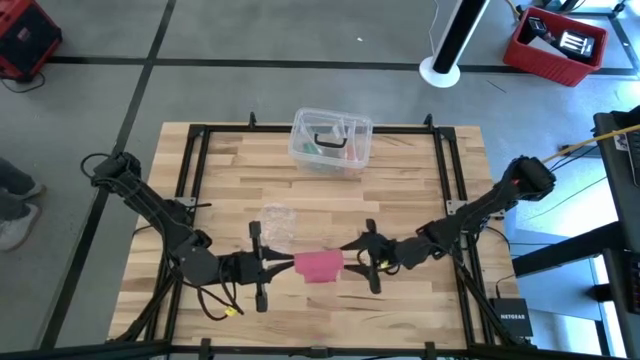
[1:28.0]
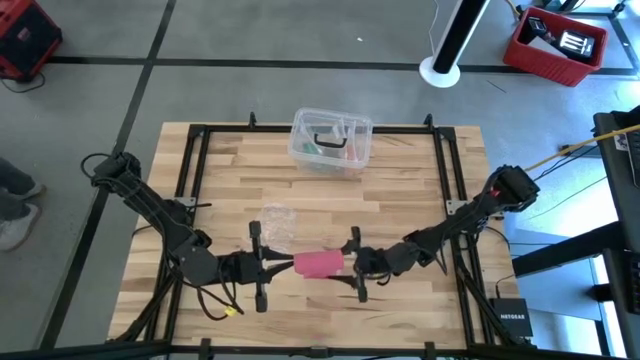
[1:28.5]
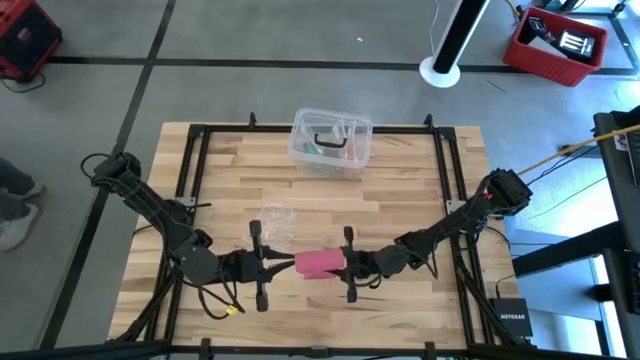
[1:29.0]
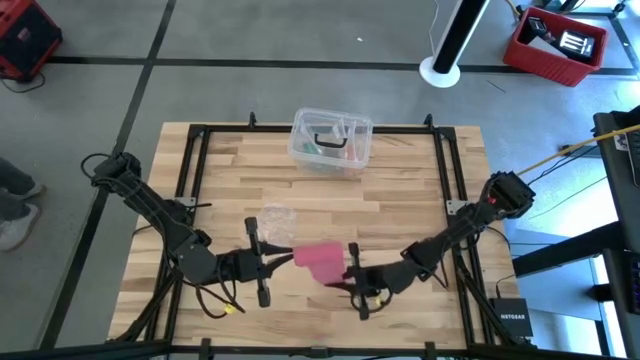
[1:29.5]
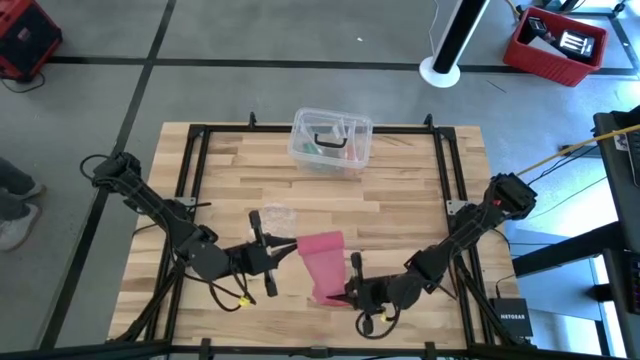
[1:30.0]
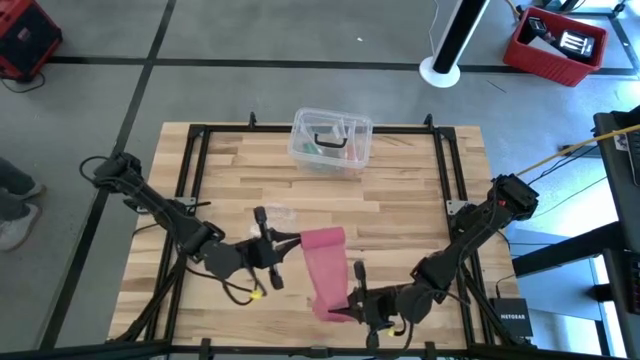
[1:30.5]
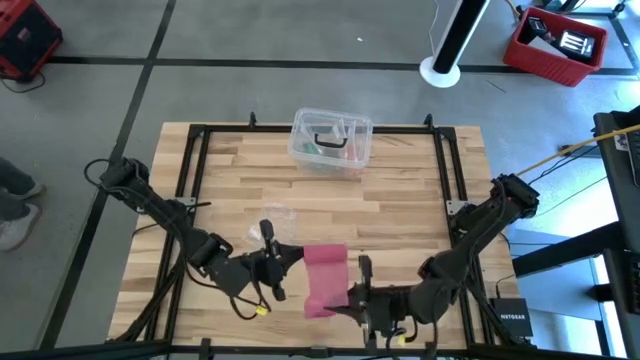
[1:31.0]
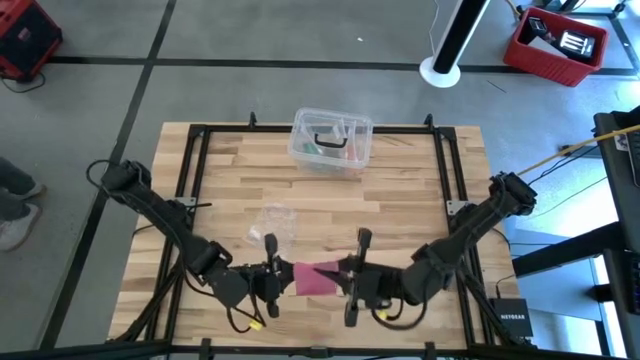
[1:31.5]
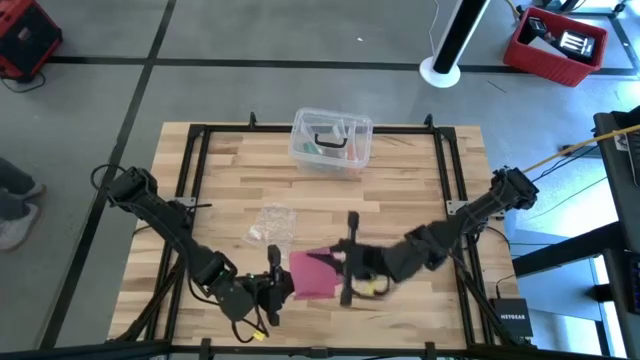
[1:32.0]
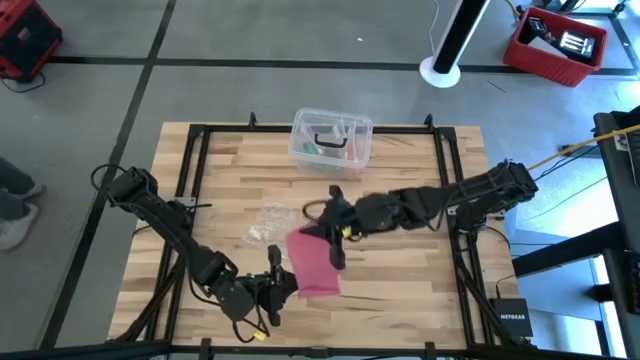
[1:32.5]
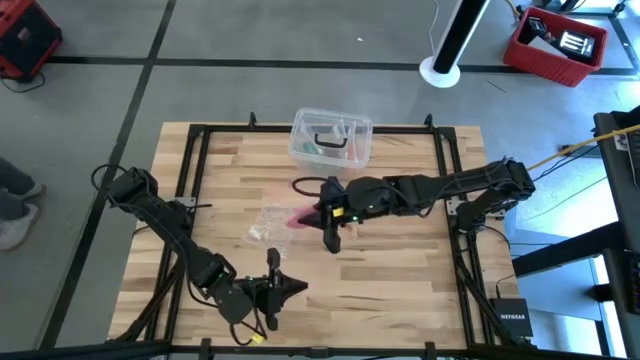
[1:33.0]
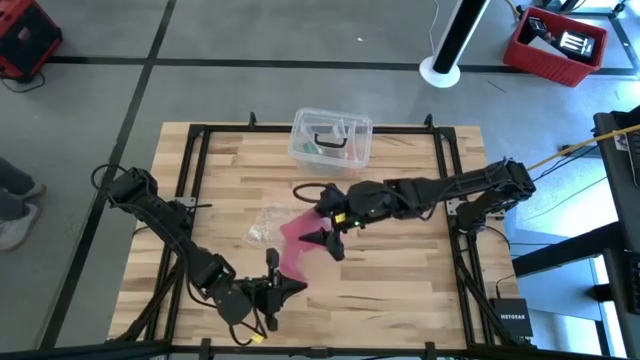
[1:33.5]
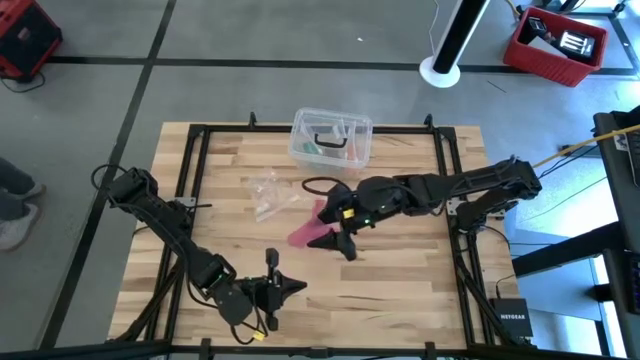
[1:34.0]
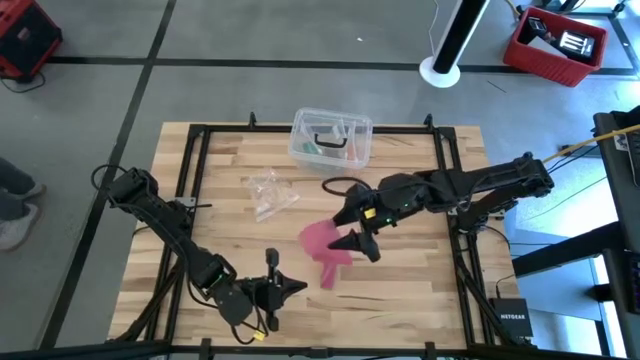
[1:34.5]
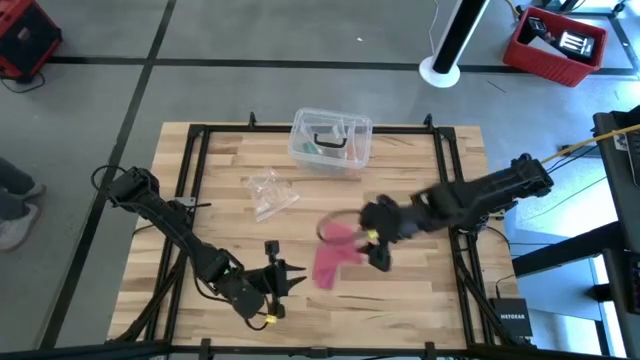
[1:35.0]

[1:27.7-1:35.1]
Task: Roll bandage
Roll the pink bandage

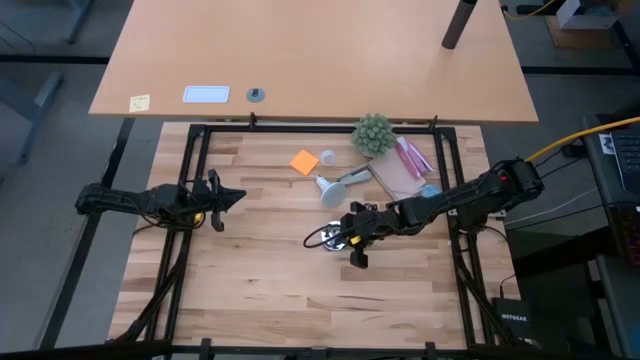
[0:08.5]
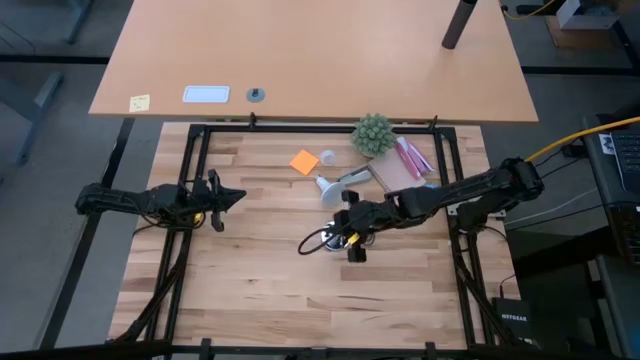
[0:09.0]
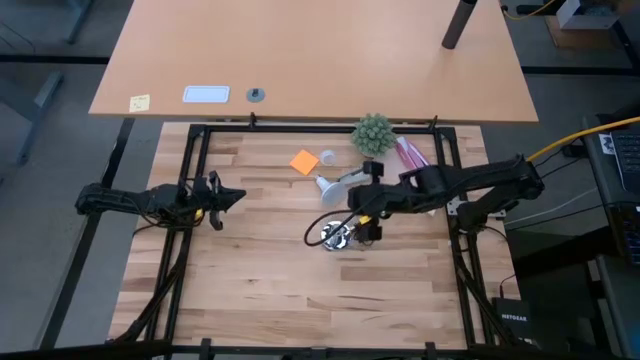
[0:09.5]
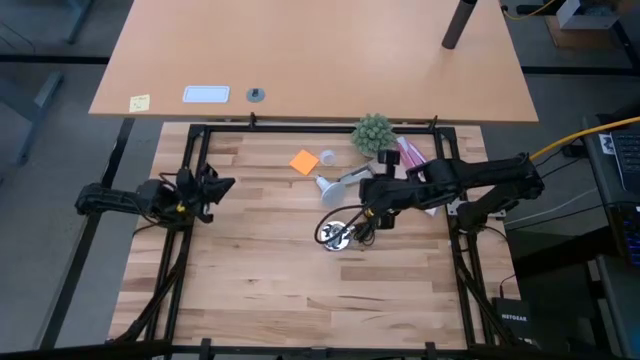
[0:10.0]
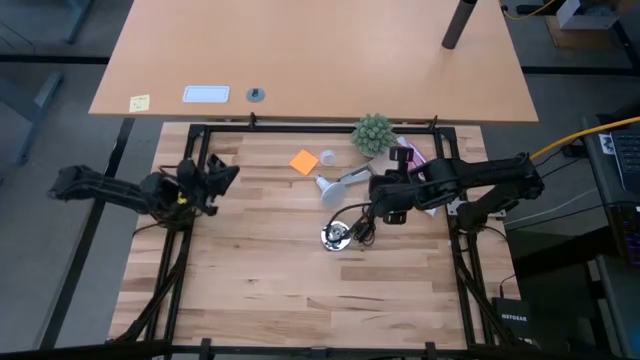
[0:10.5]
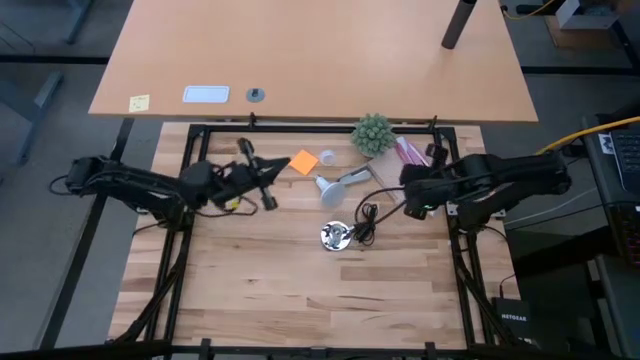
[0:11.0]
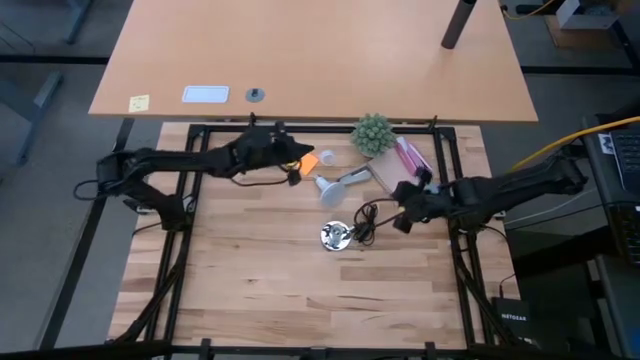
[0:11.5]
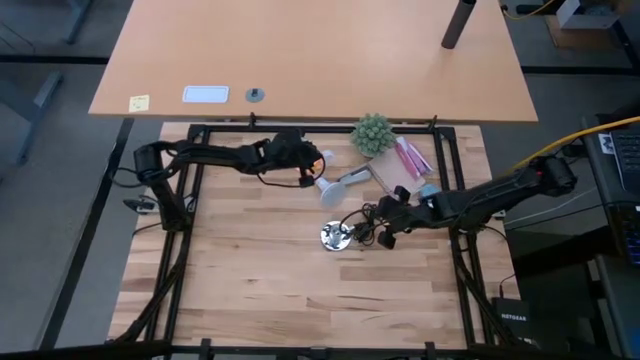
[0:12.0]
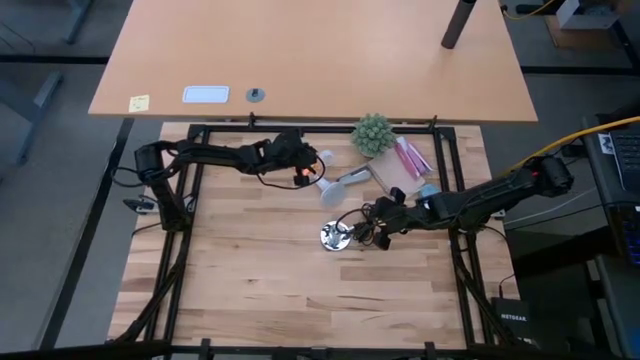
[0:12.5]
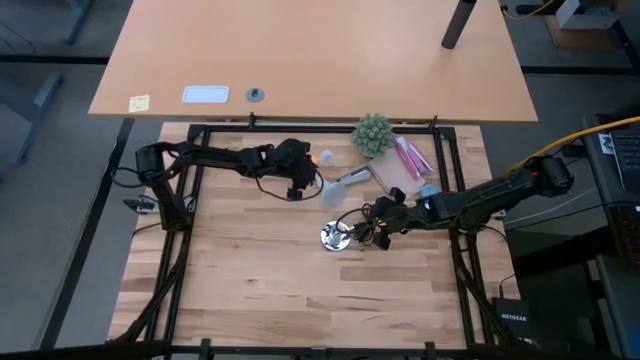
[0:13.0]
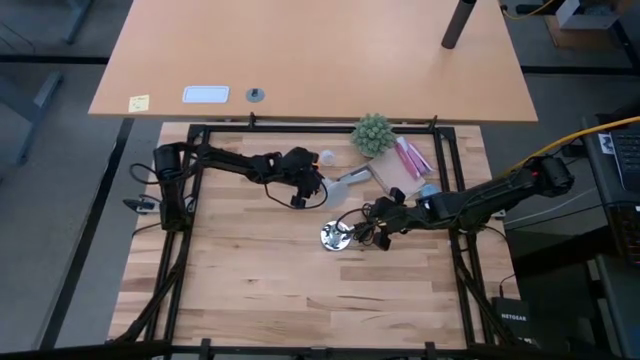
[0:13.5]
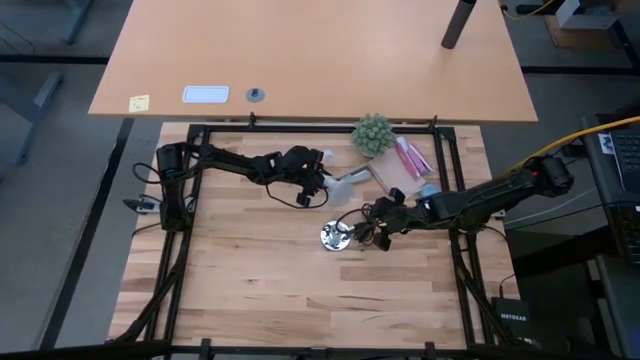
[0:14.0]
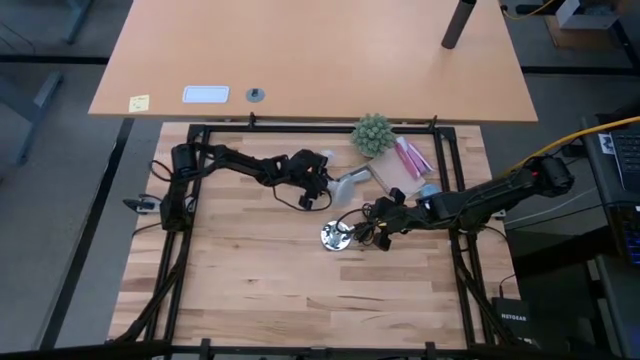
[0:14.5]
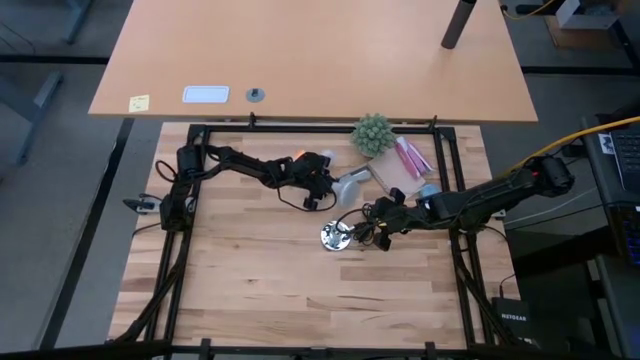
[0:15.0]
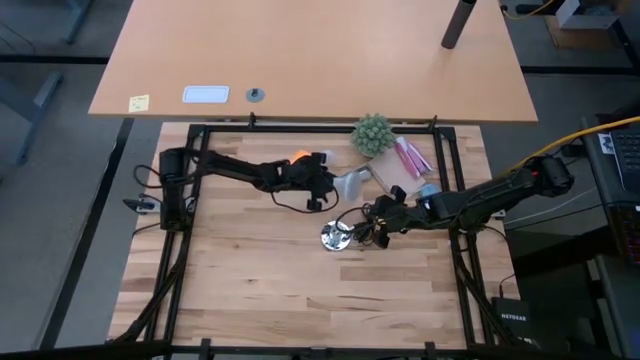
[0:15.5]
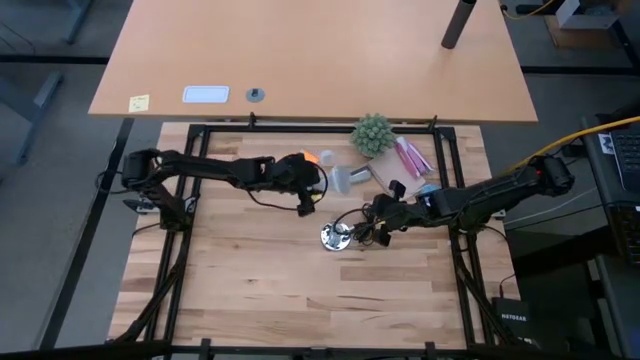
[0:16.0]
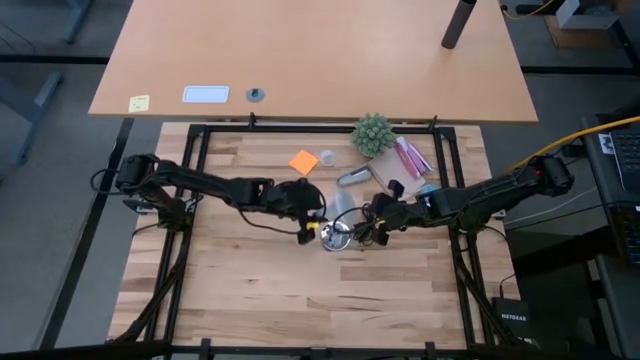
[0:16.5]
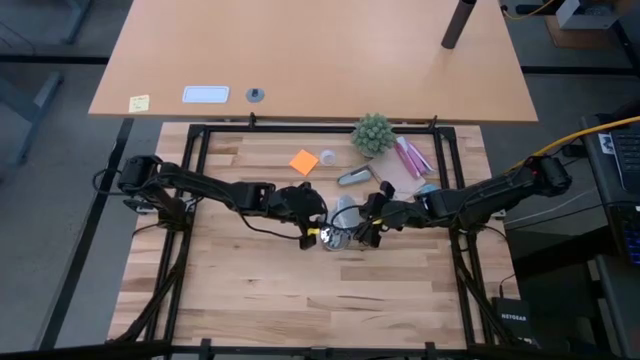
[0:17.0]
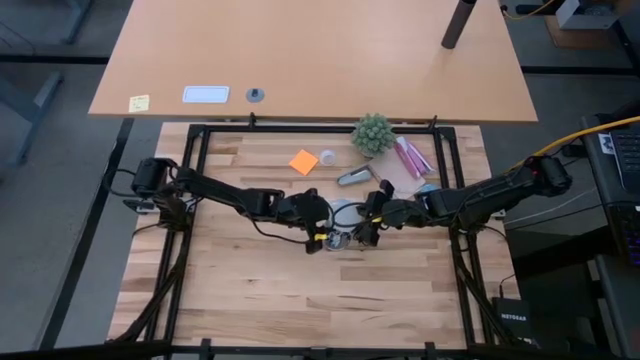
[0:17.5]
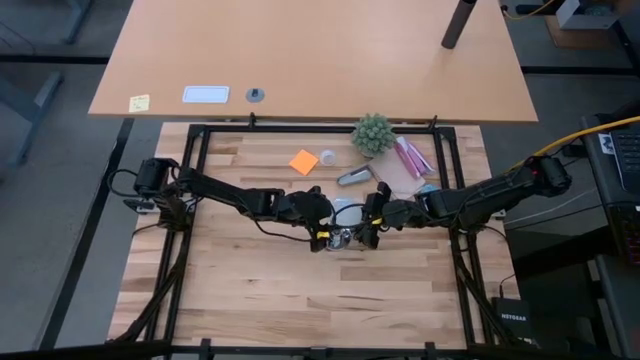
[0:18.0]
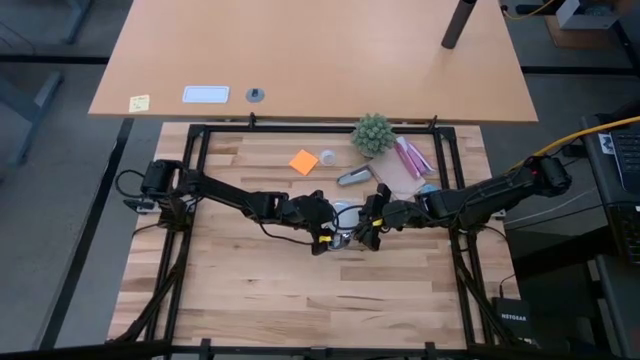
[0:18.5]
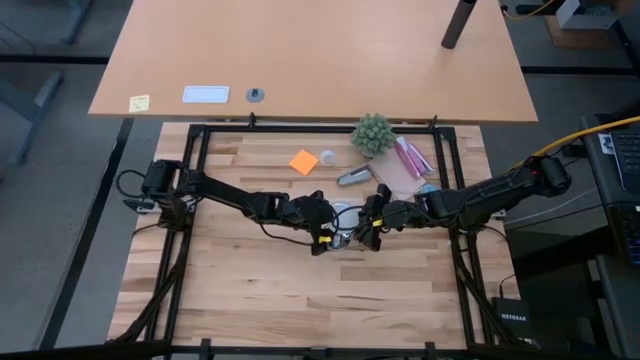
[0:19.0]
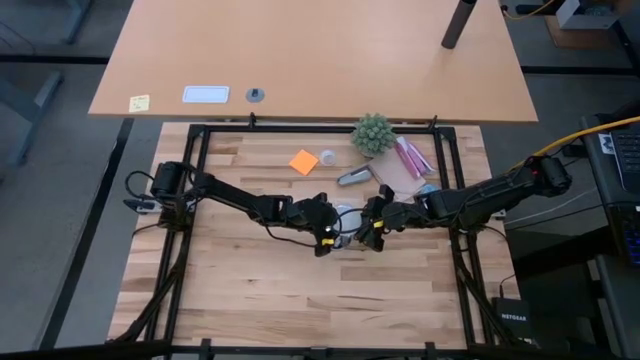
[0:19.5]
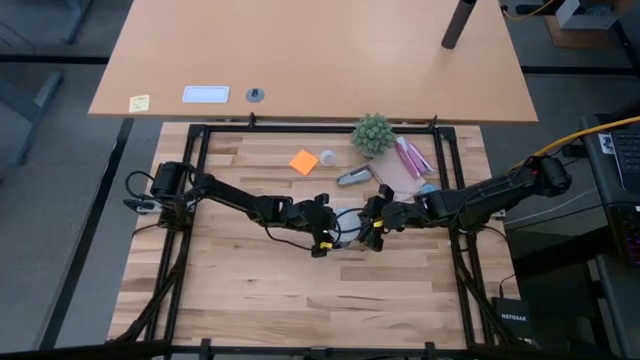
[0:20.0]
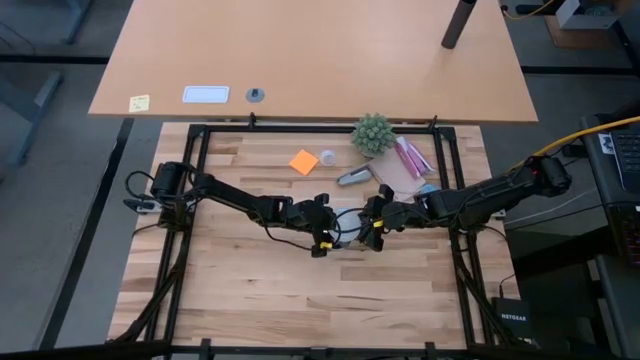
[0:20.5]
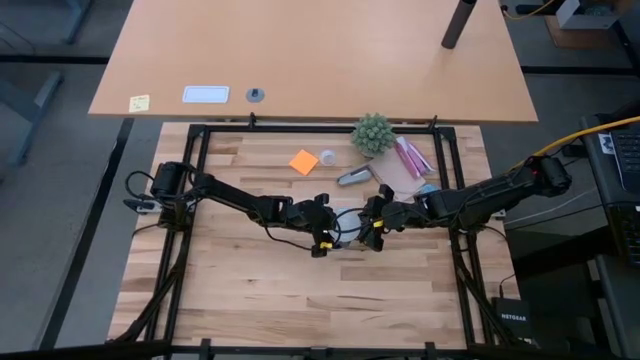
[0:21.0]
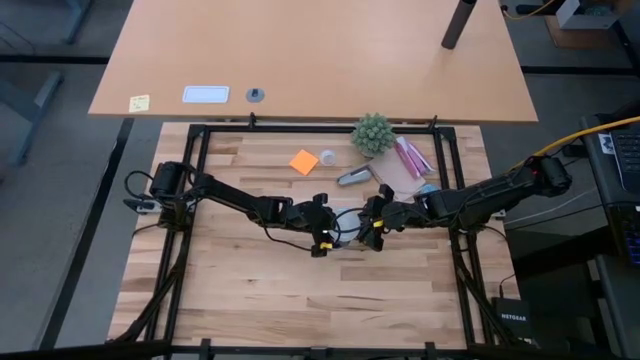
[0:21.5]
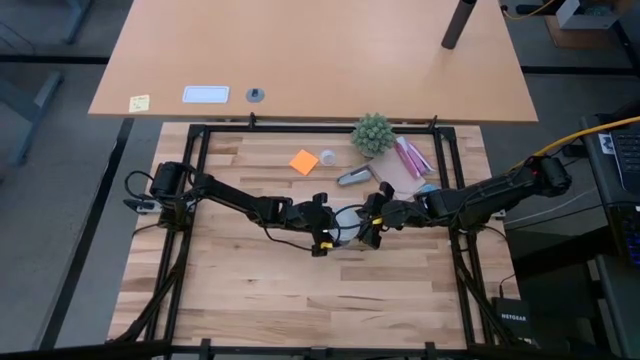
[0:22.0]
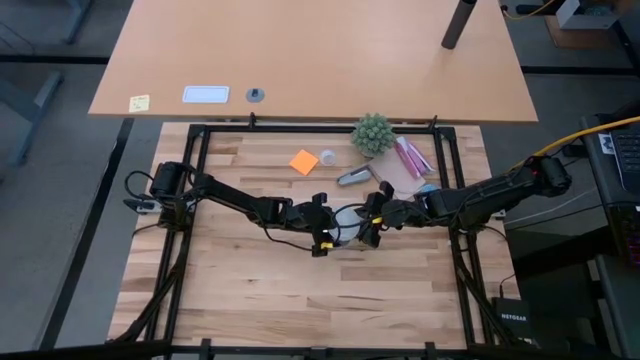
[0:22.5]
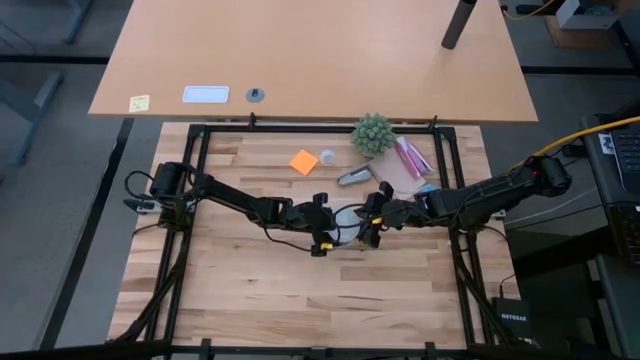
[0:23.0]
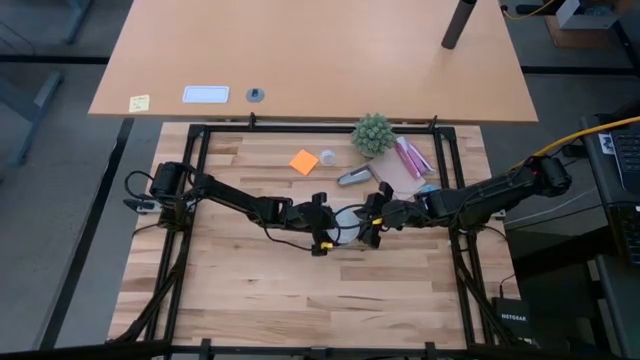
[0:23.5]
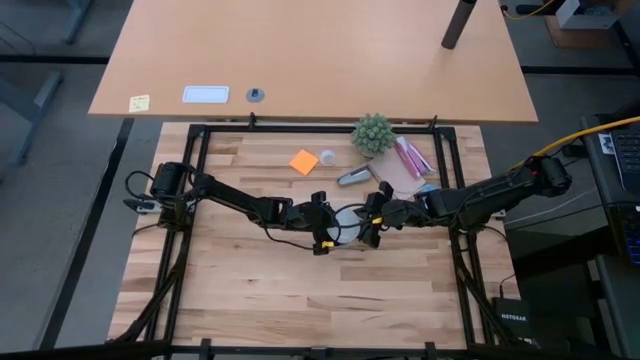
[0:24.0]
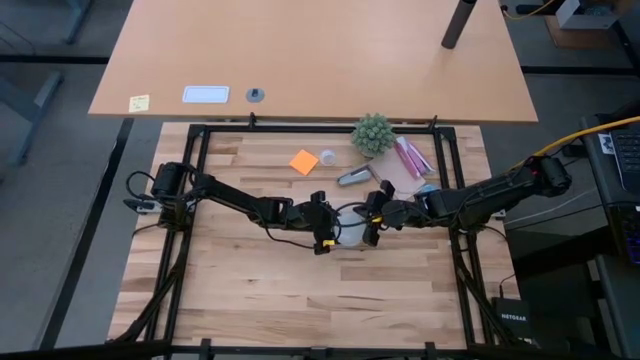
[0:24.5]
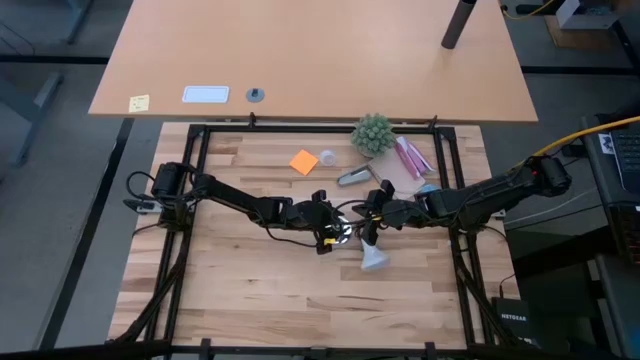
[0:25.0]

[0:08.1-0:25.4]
Task: Screw lightbulb
Insert the lightbulb in the silver lamp
